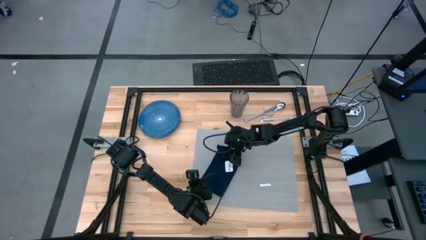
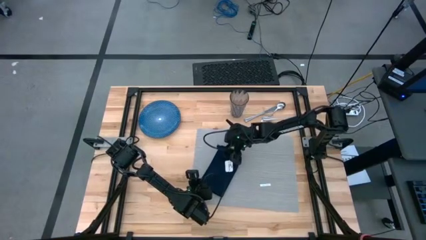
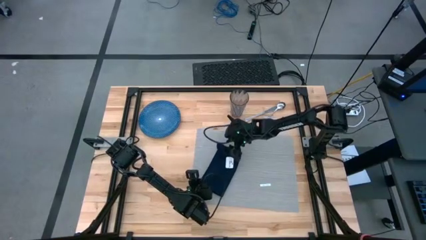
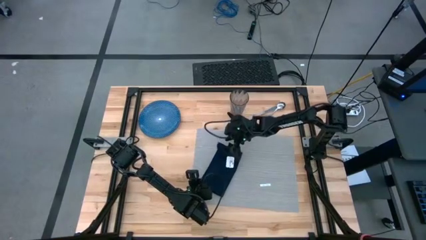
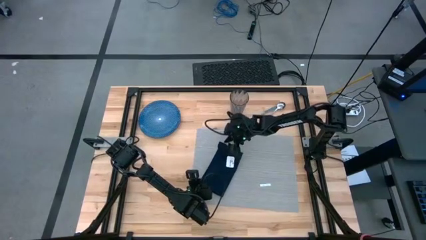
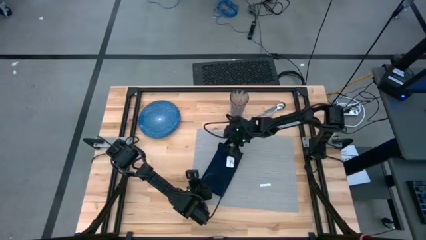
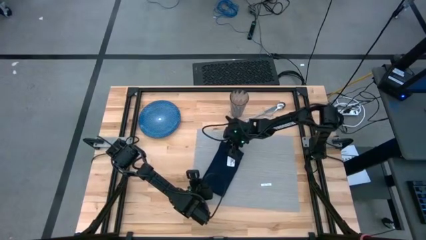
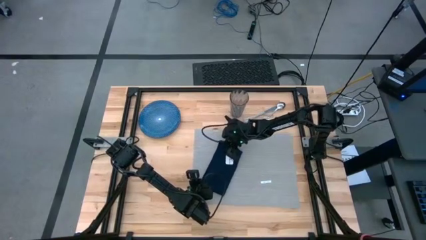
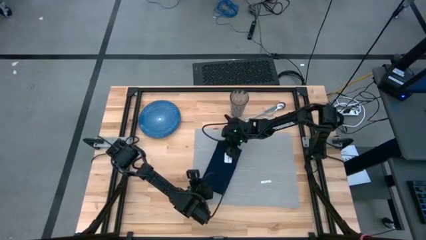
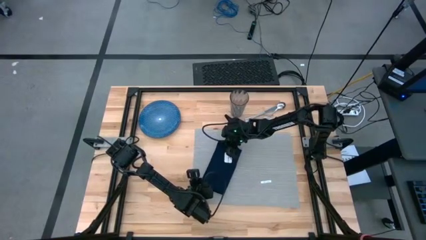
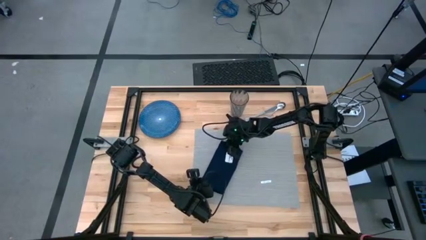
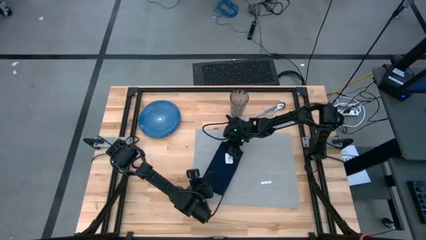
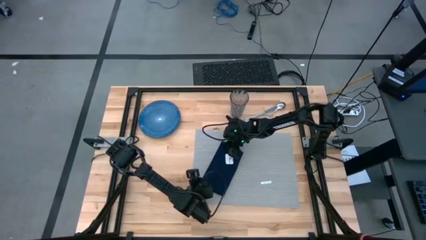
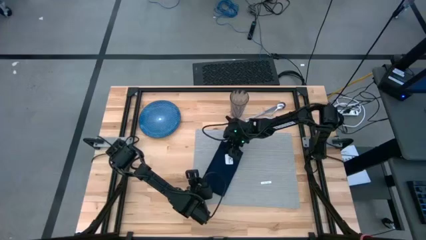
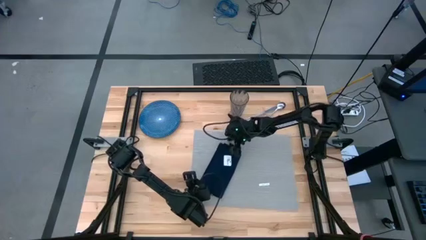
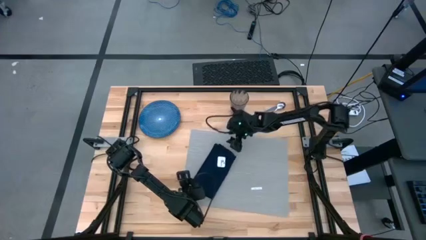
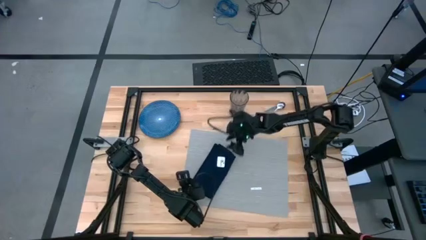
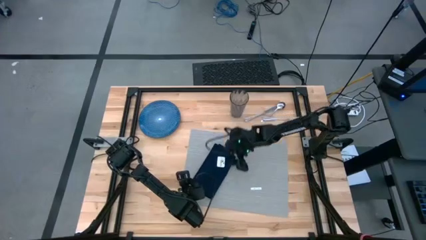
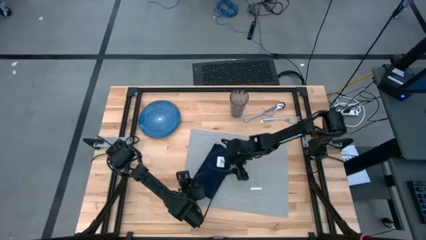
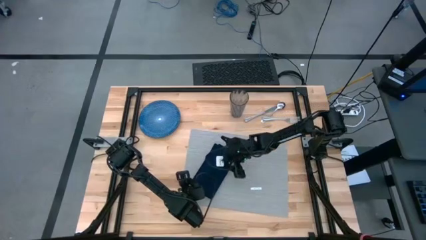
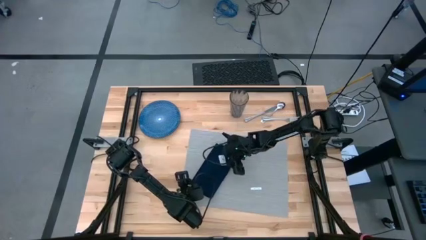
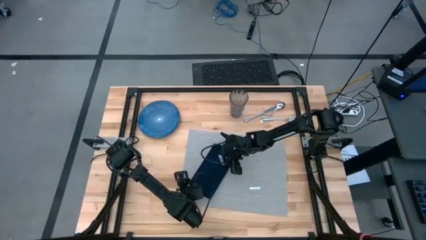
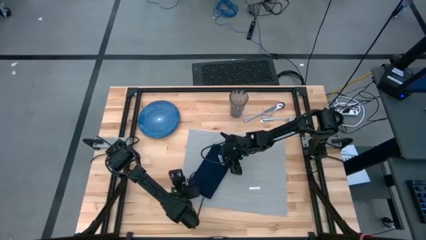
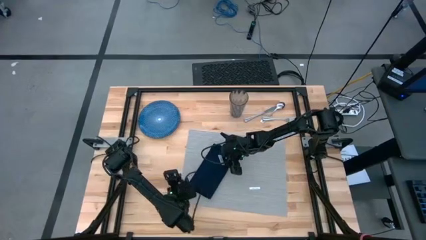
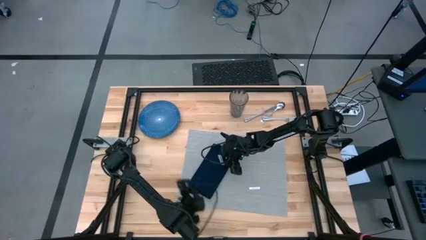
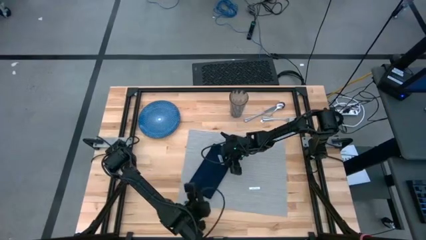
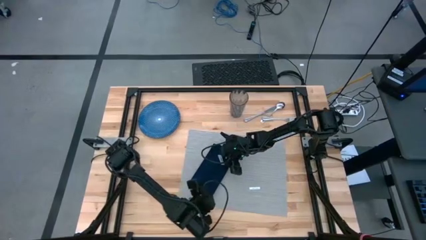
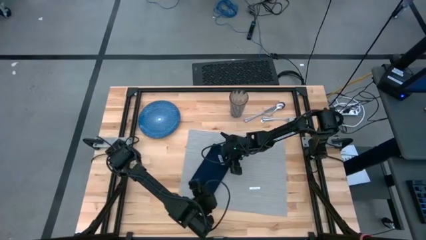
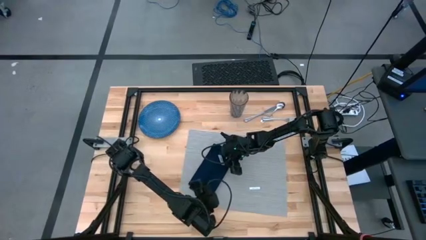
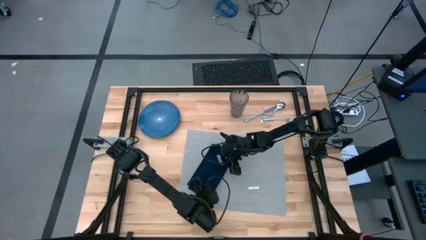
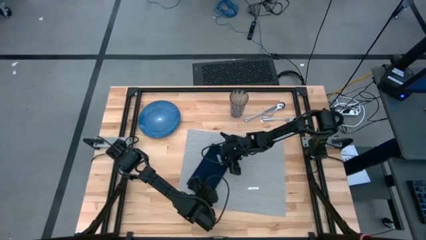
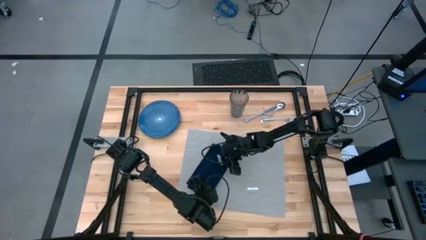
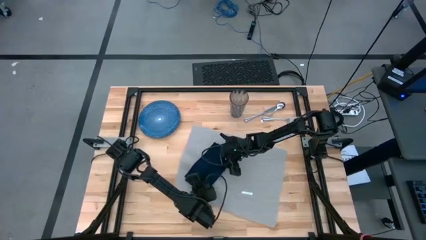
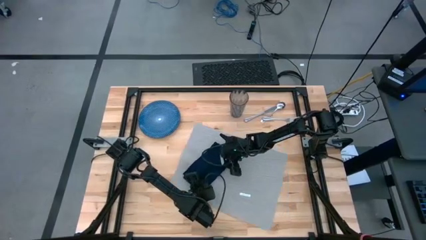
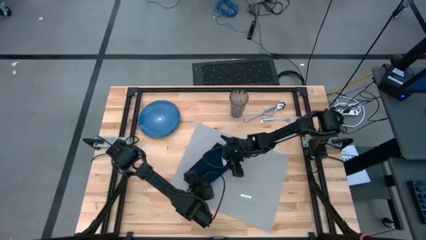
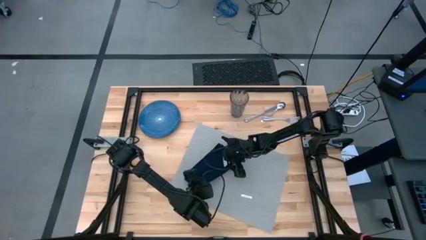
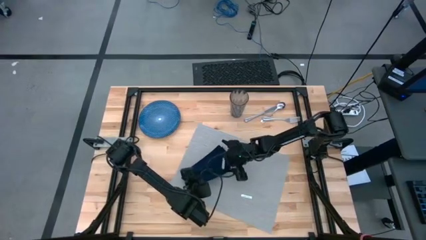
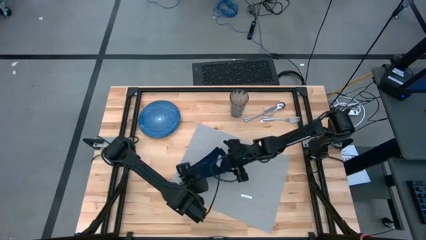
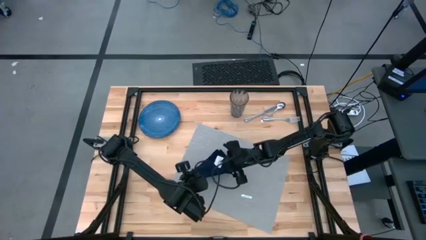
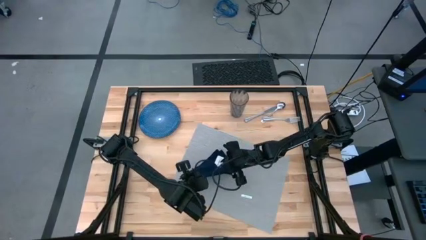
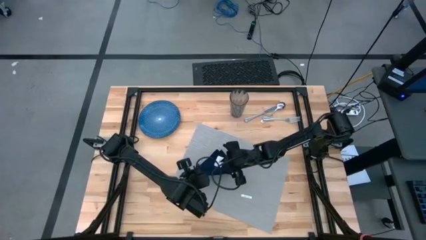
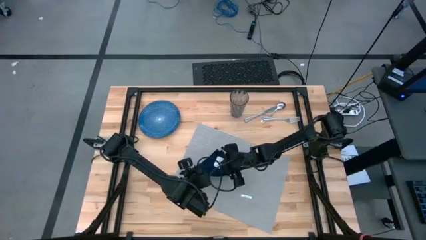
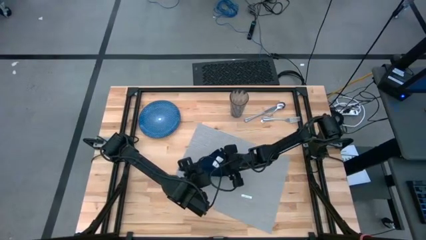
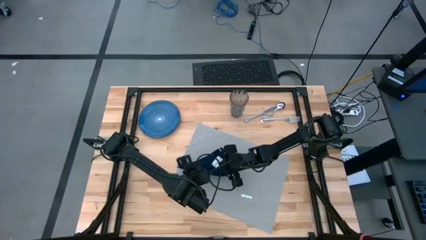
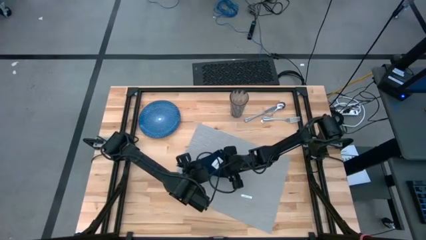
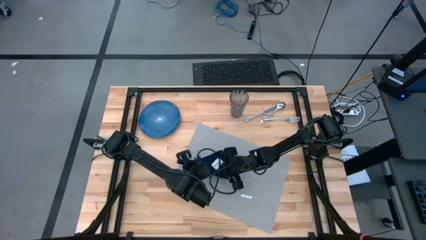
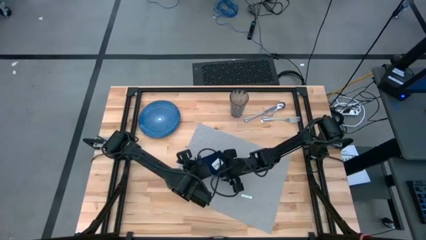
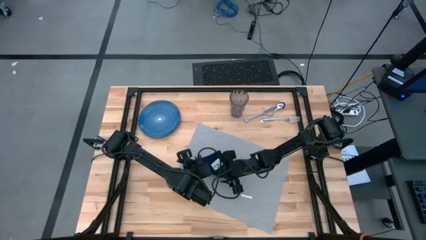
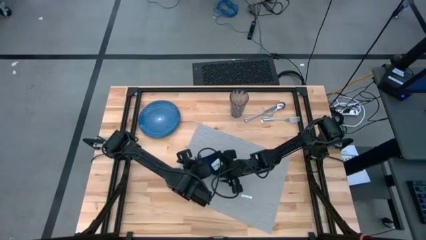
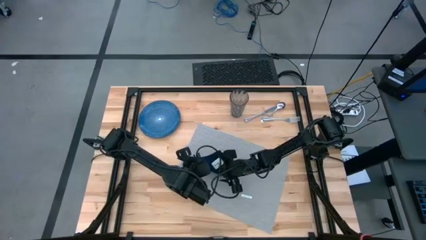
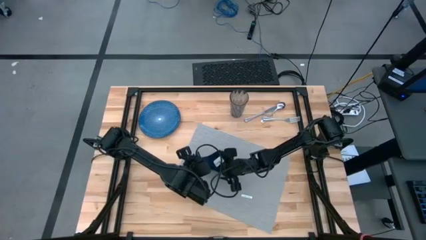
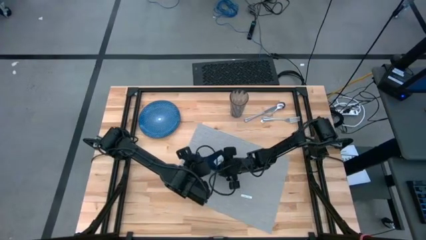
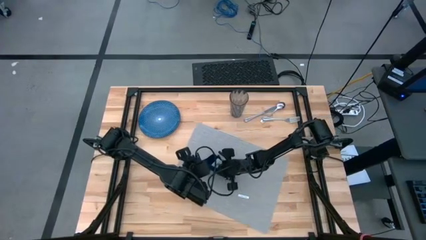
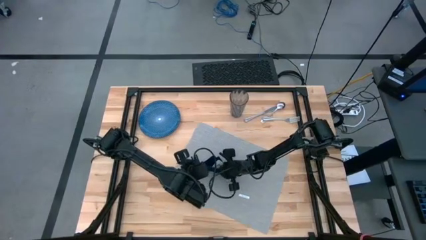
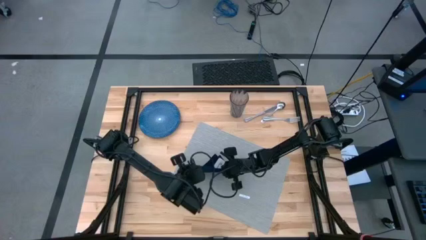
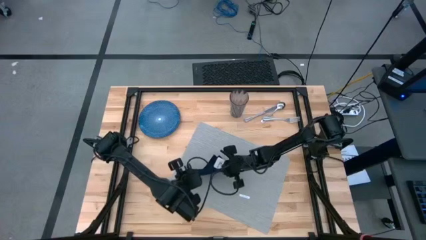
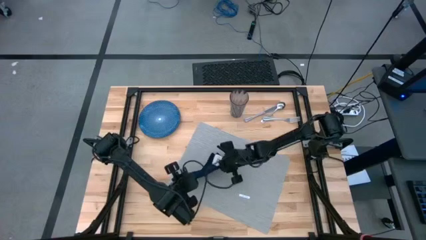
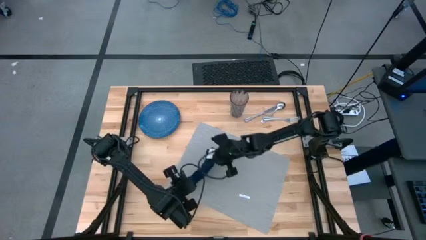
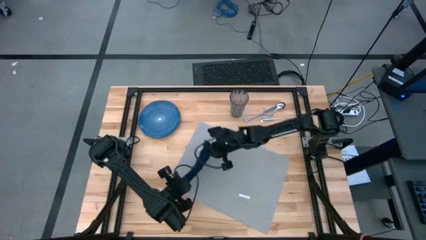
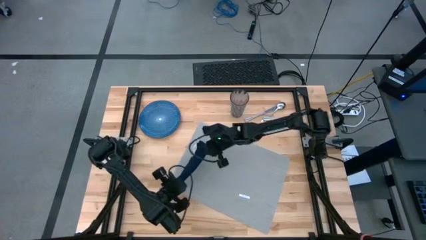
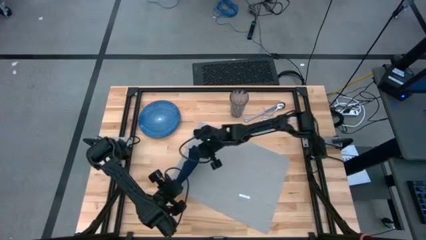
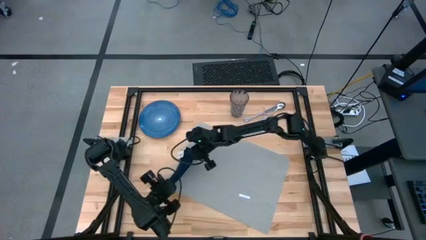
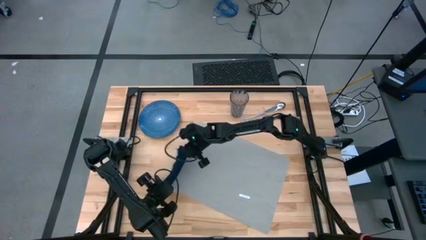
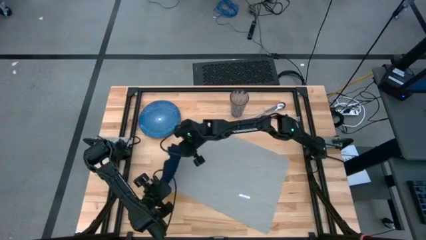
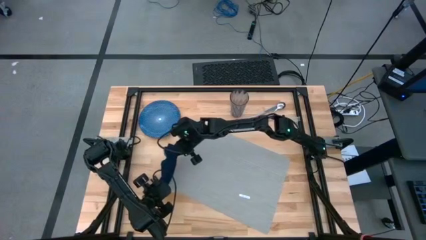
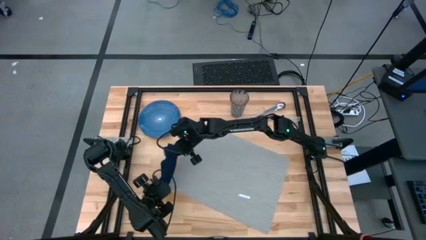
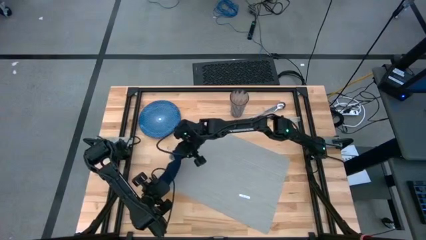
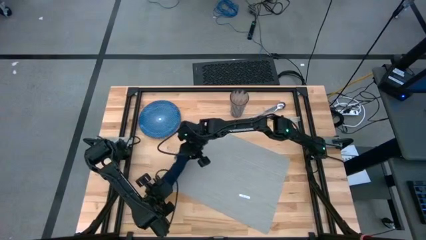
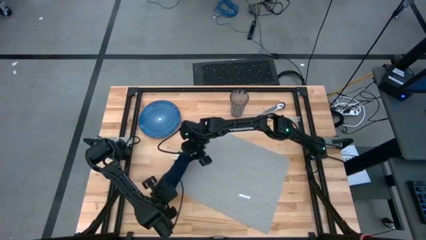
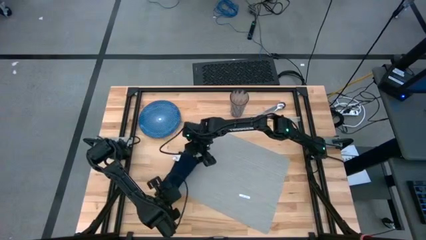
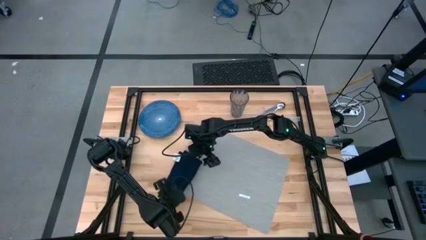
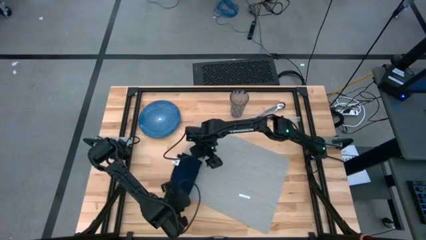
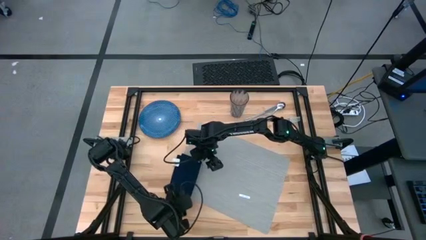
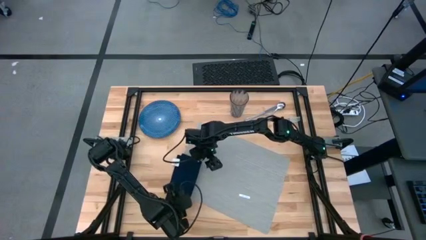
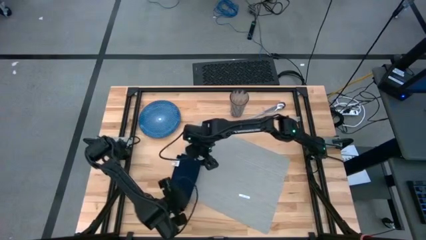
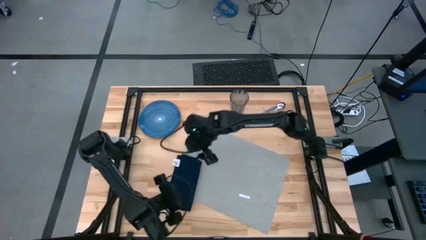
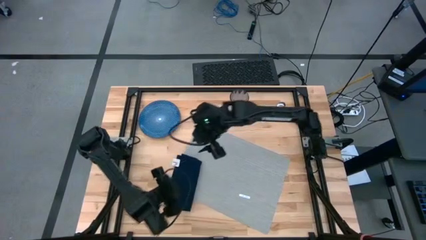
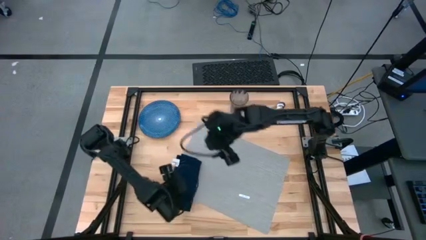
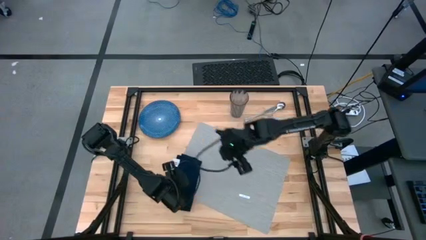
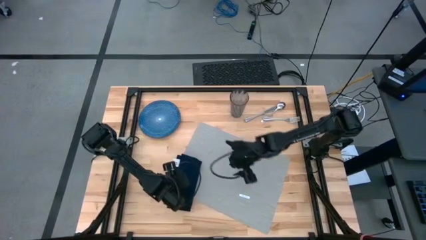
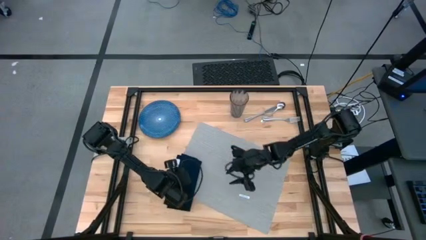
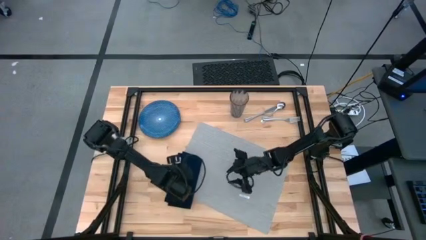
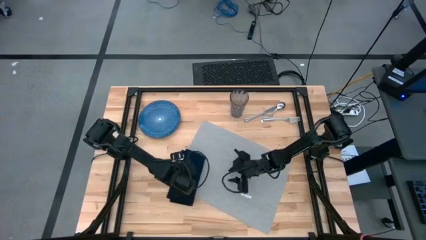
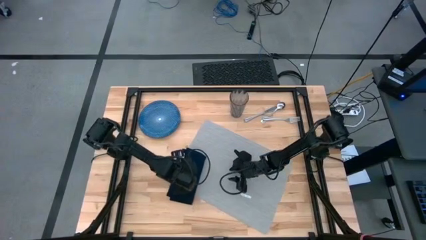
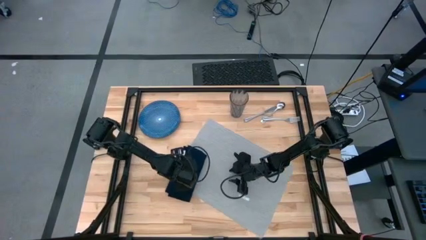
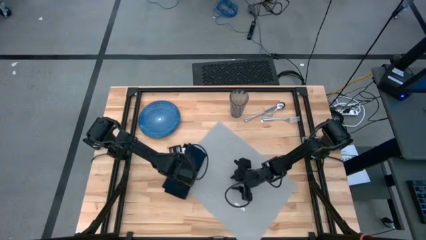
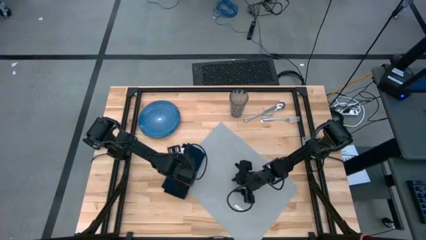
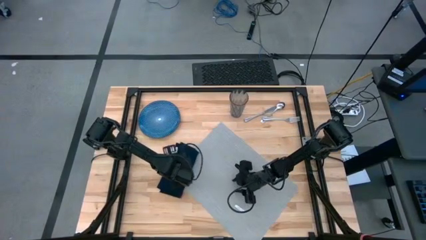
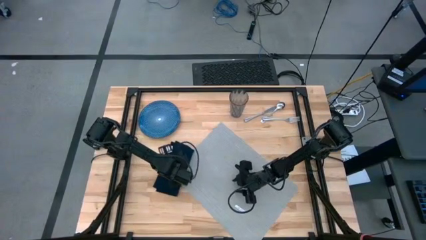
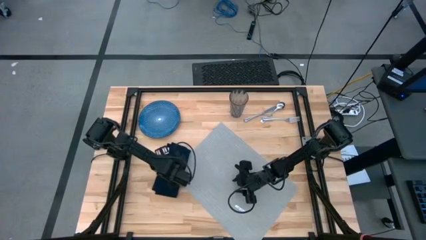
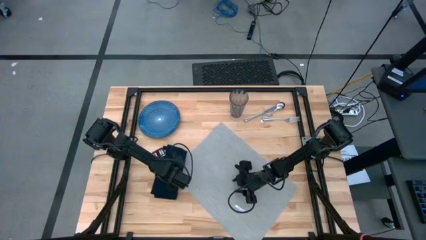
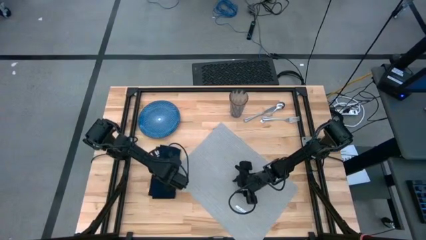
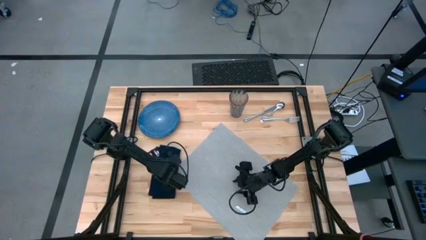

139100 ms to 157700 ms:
Task: Set table place
Fold the blue napkin
